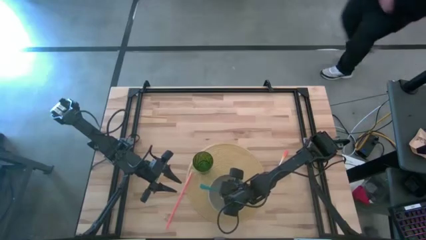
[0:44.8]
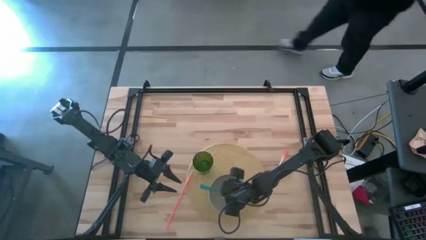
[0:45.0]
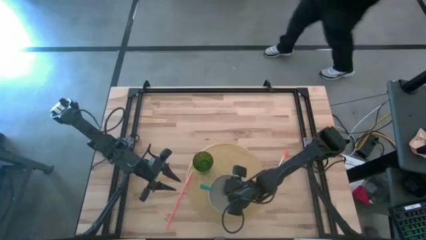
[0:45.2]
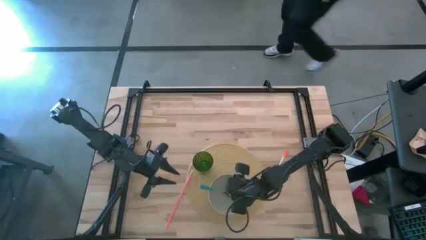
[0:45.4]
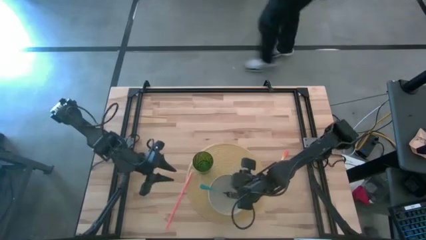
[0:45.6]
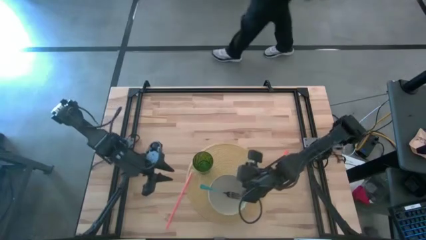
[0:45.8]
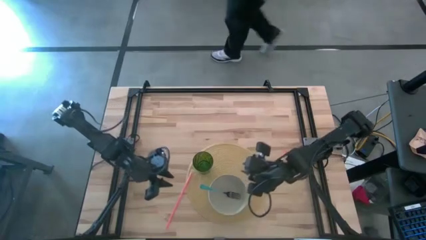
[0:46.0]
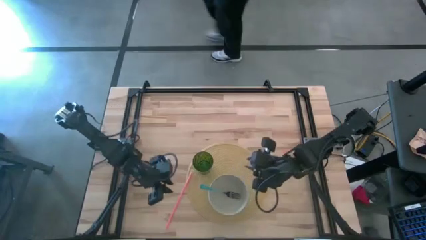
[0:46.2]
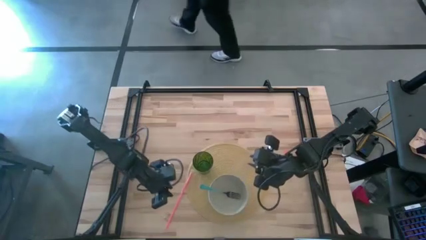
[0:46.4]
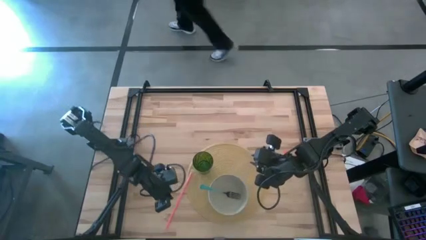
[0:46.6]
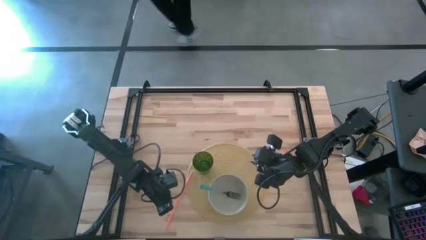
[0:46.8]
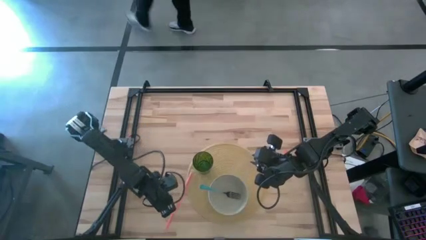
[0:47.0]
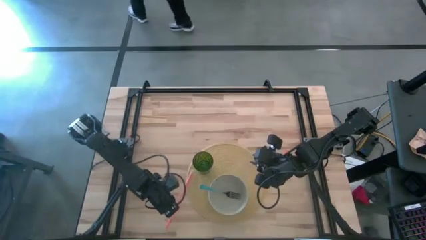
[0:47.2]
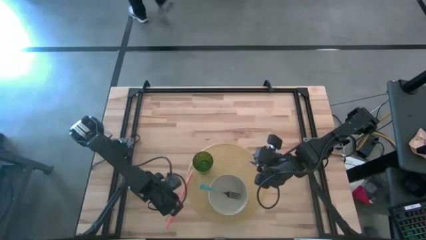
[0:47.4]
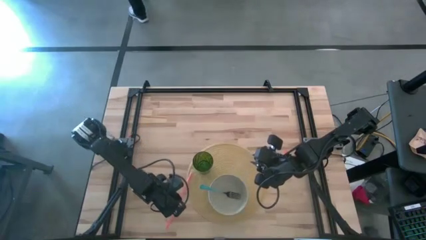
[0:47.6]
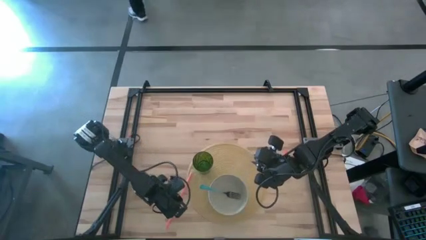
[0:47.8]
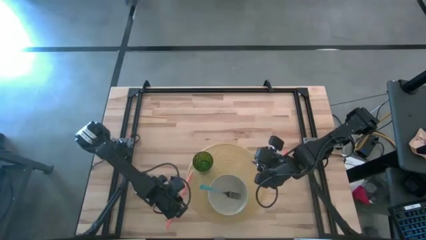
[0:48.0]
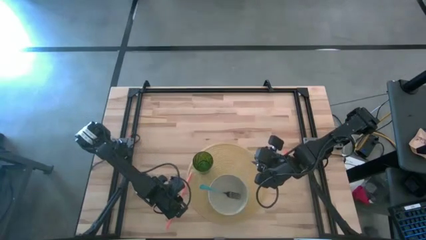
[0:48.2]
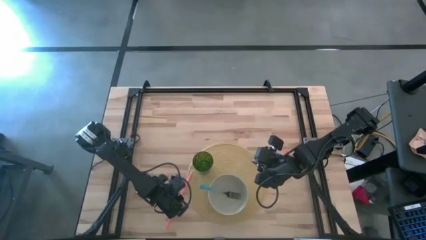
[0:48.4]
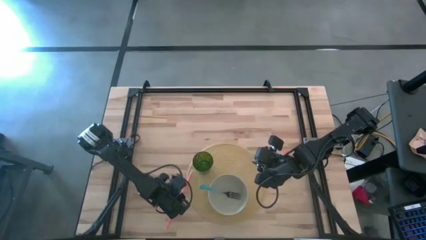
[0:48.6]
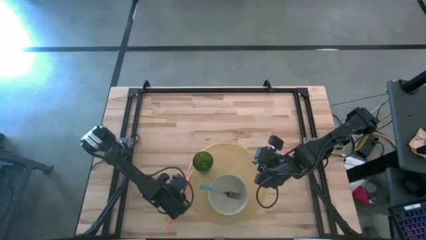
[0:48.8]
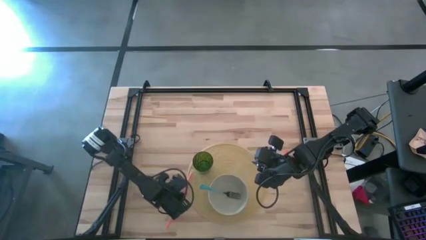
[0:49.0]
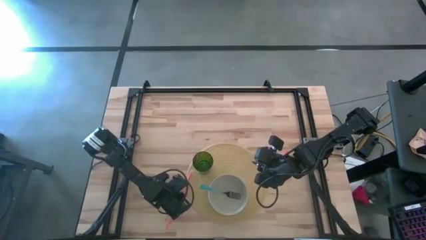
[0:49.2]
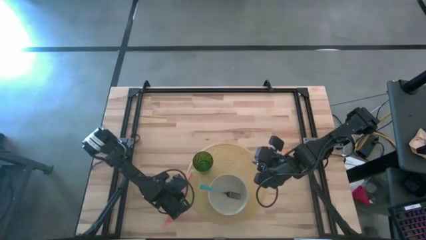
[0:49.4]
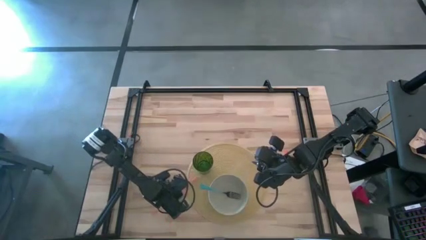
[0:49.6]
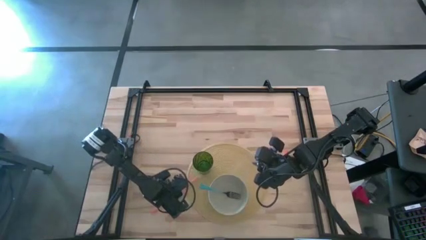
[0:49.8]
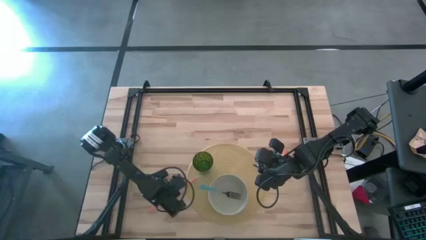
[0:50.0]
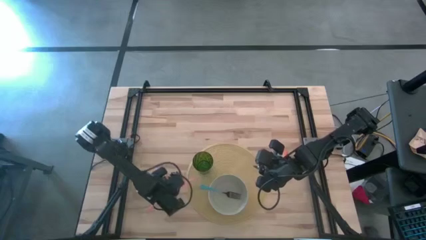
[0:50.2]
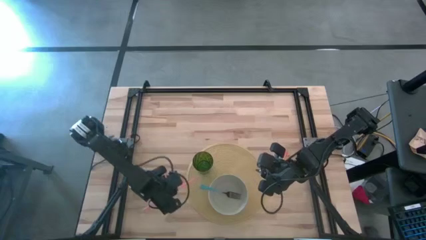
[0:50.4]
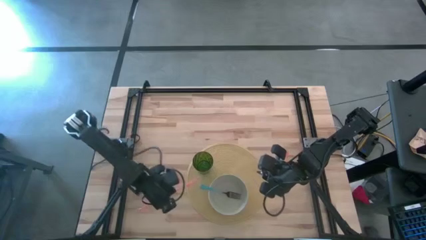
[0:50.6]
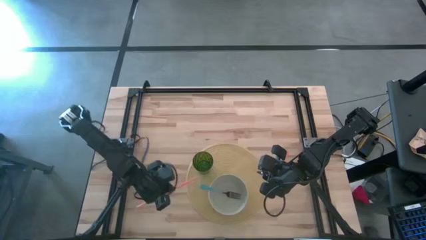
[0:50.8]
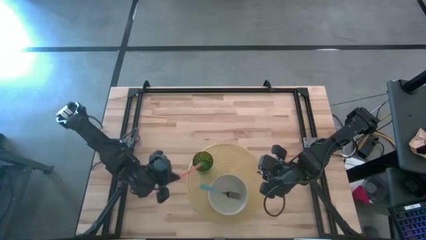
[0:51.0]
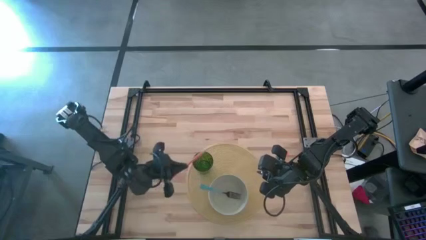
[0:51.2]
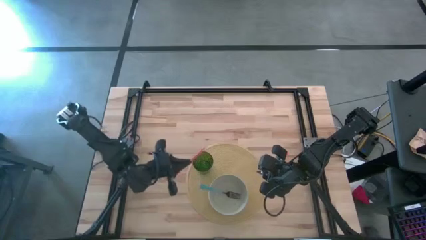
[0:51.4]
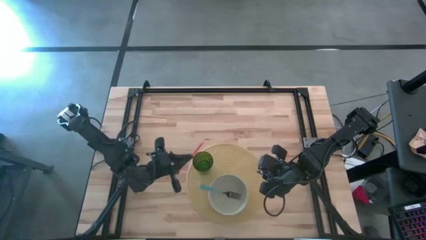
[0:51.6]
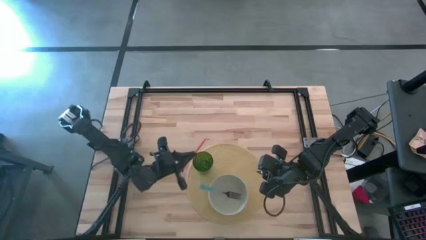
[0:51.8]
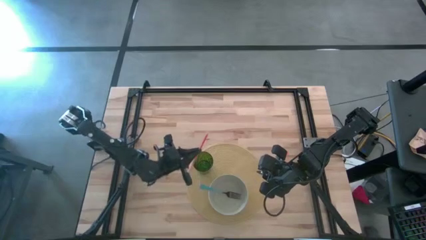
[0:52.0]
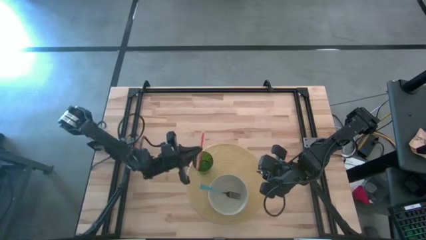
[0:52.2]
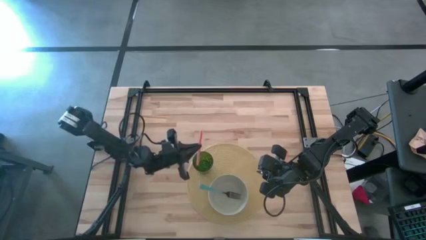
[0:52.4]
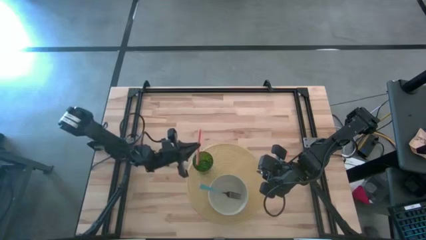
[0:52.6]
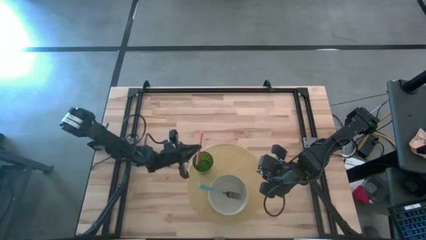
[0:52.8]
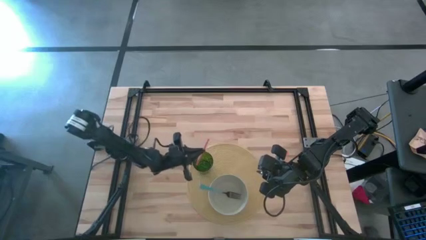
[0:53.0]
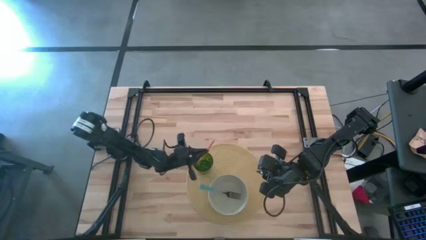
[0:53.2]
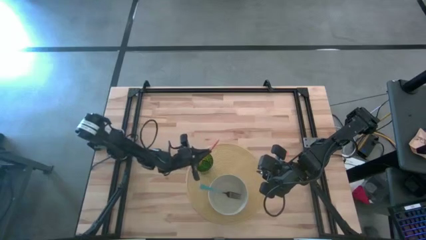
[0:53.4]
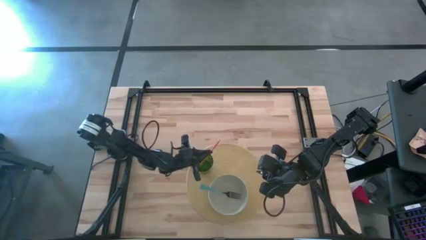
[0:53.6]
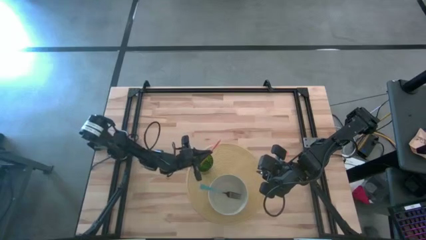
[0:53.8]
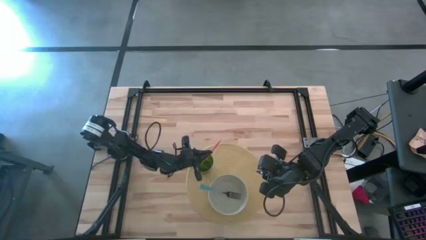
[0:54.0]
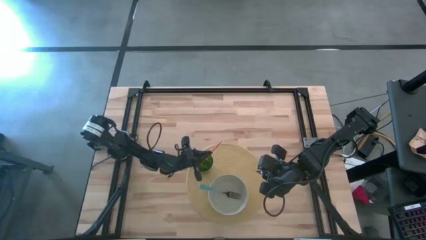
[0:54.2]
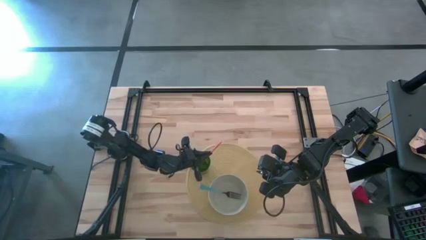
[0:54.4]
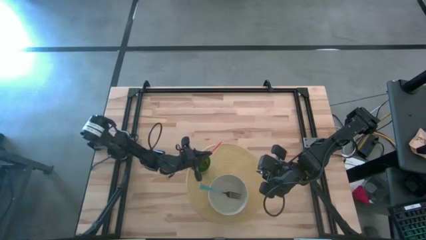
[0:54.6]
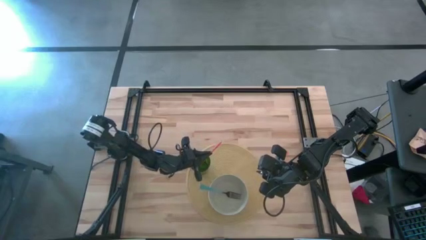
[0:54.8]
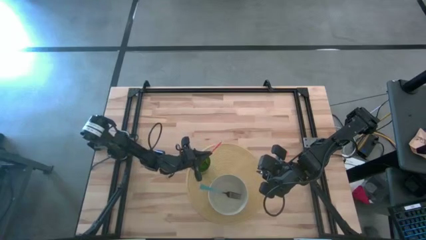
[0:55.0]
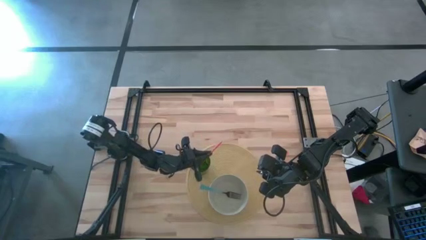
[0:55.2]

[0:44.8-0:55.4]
Task: Pick & Place Utensil
Put the orange straw into the green cup on the brown mat
